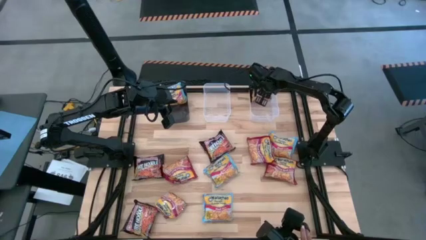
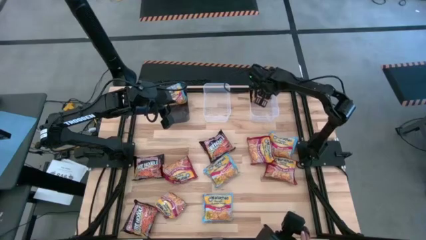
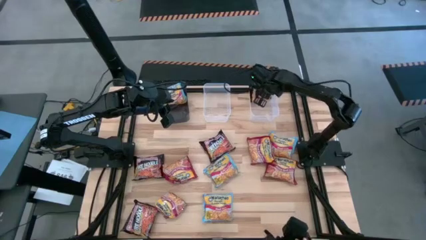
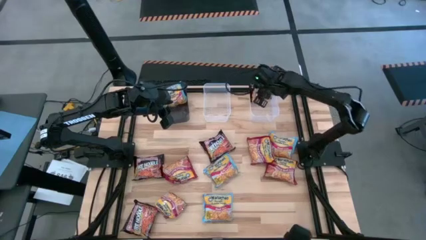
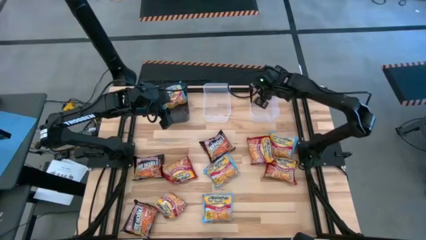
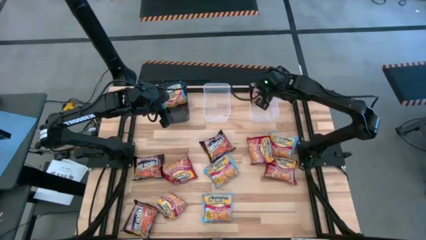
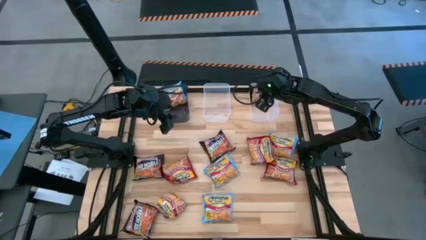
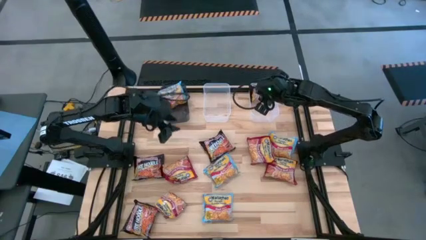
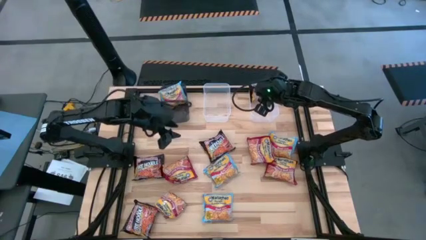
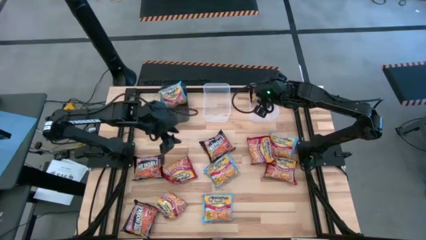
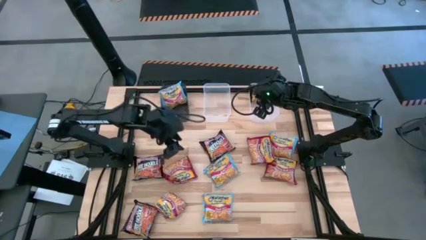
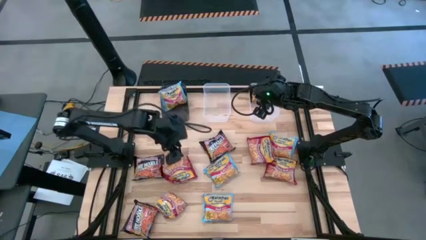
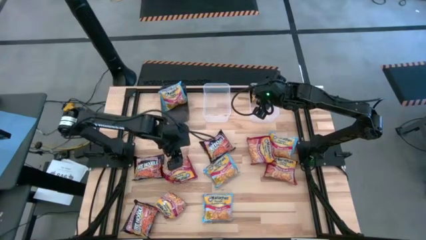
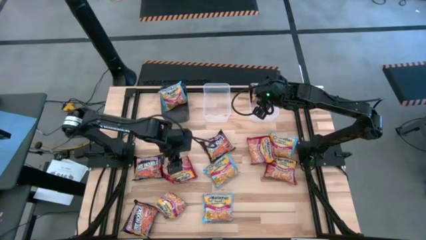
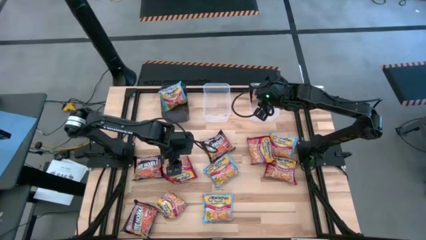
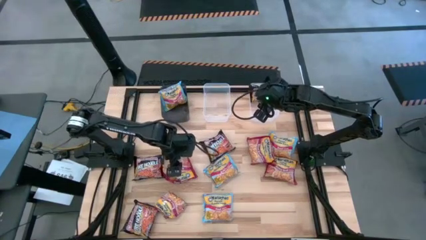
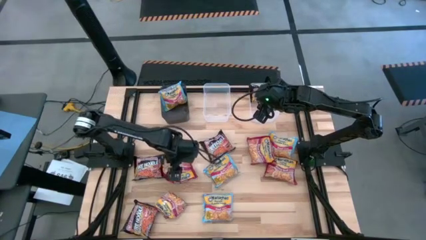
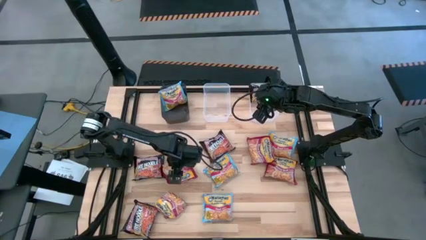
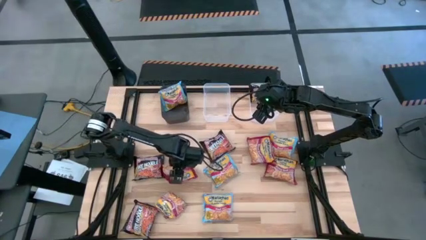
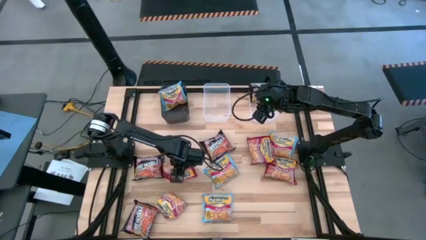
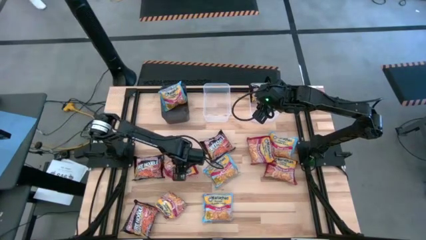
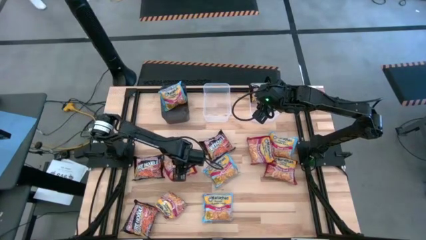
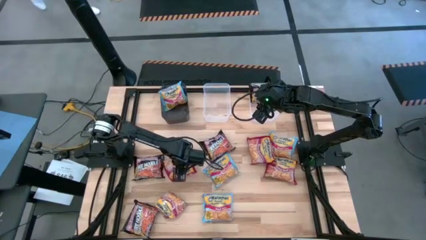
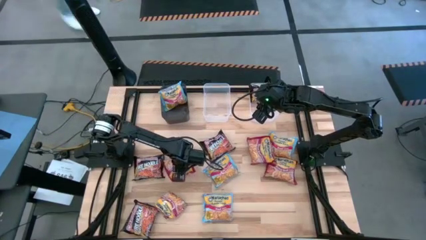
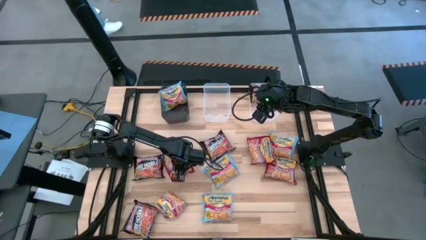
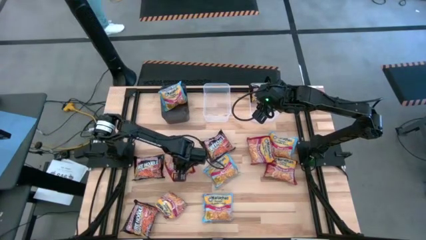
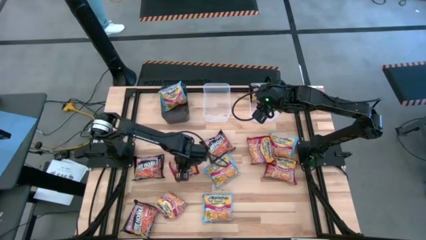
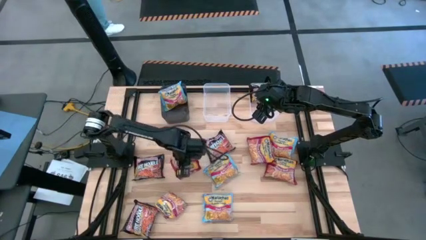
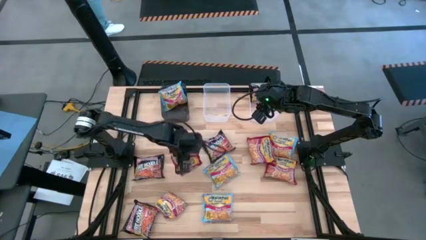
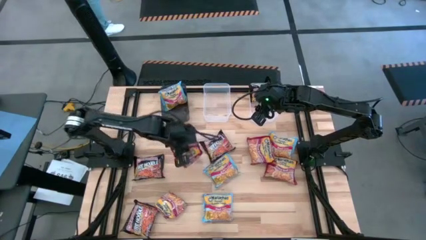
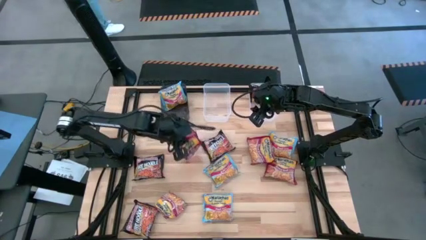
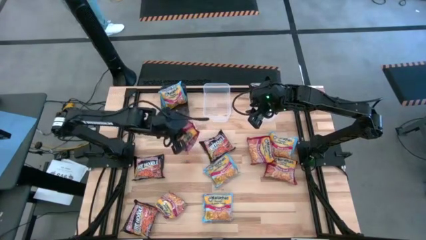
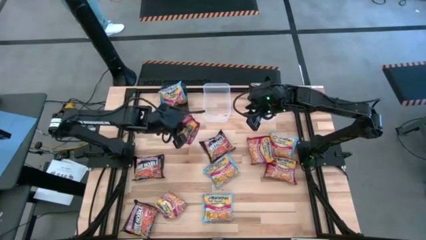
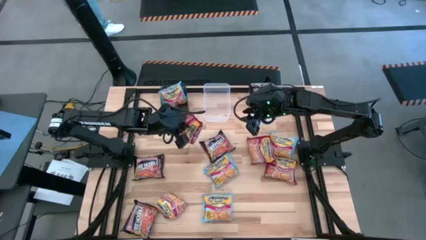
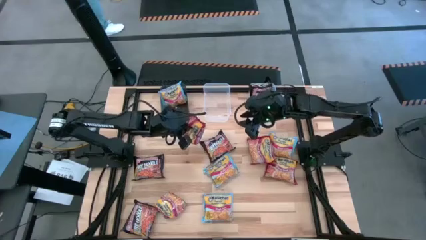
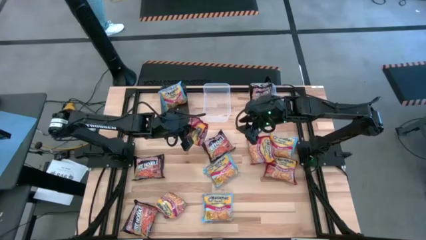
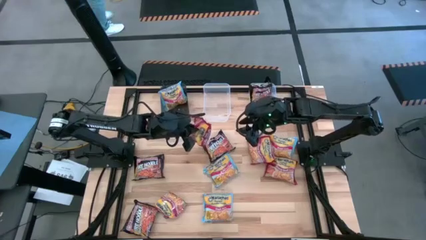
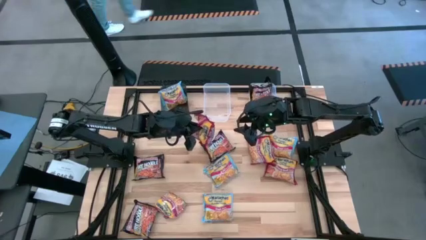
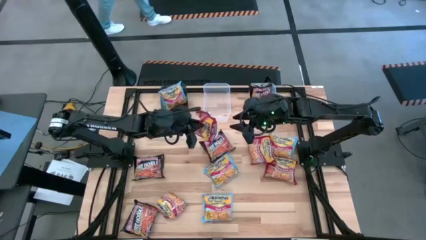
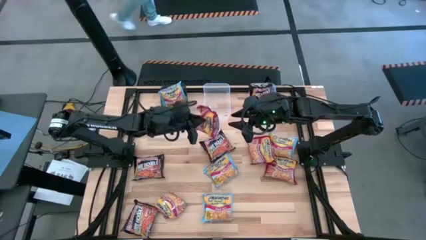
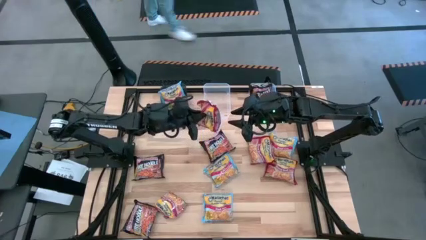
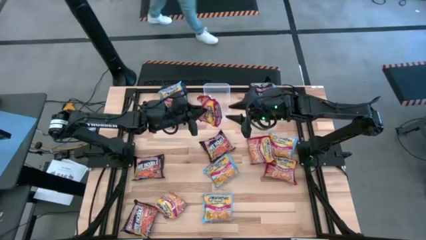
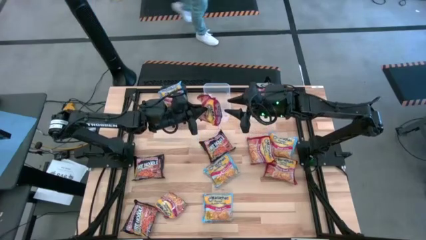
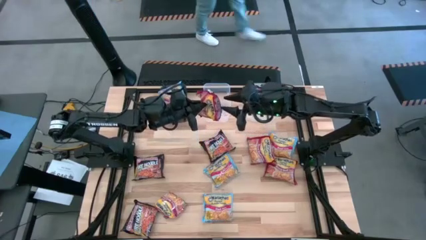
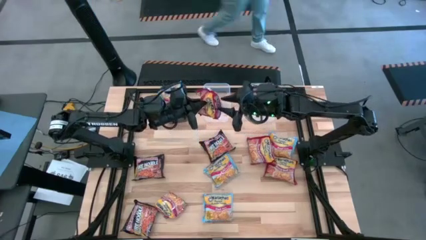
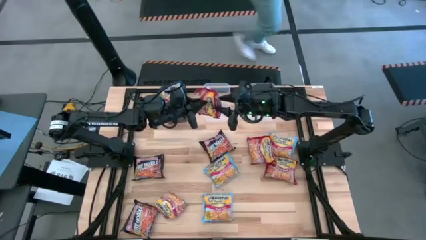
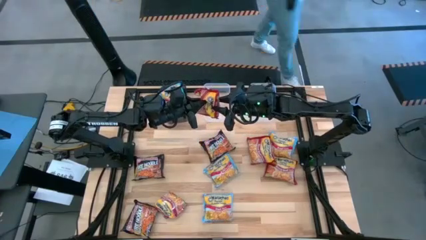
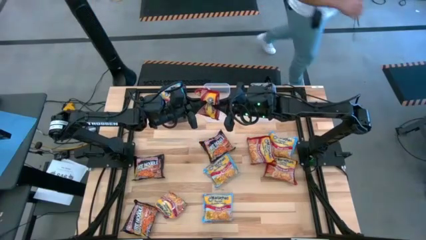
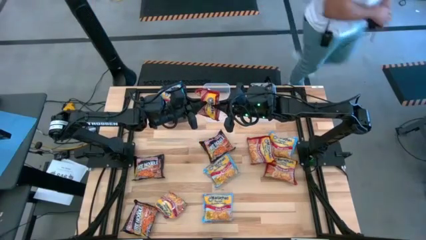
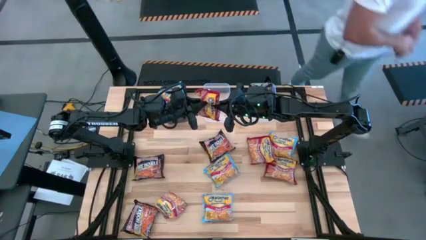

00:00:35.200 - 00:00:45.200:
Task: Sort Maruchan noodles
Put the red noodle pack into the left transparent bin

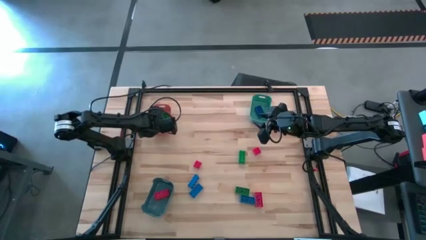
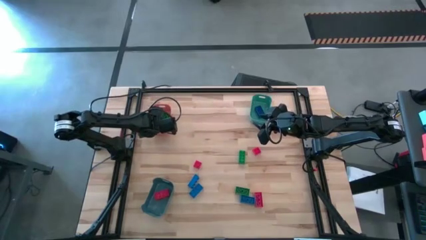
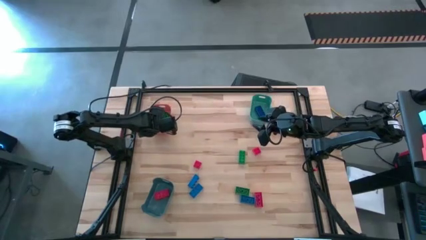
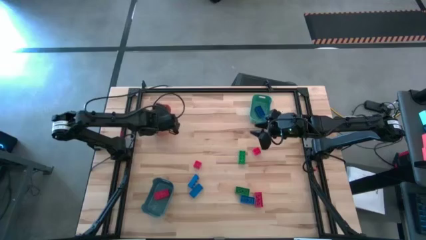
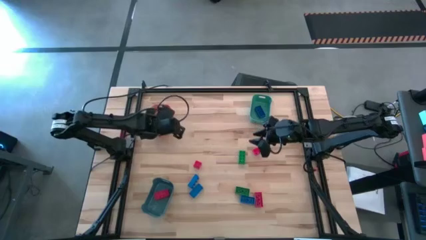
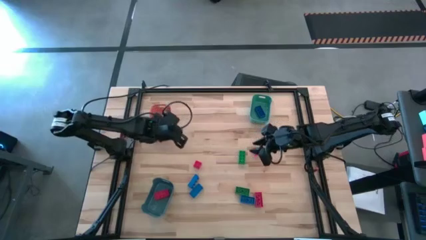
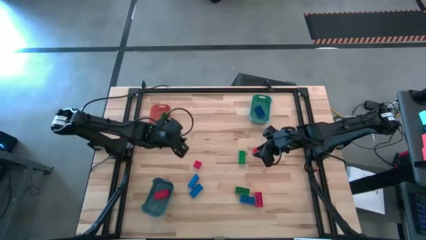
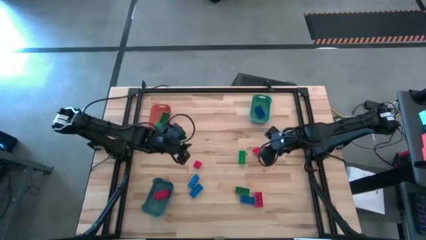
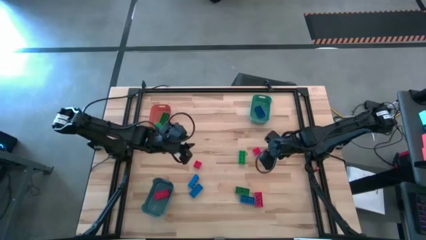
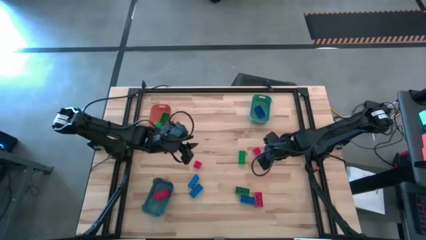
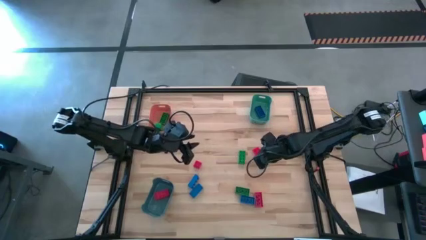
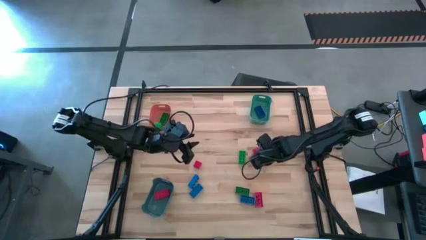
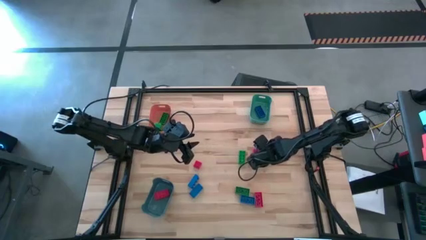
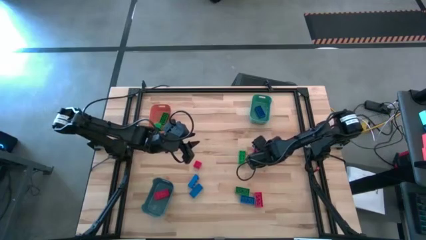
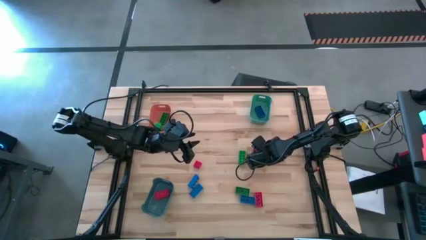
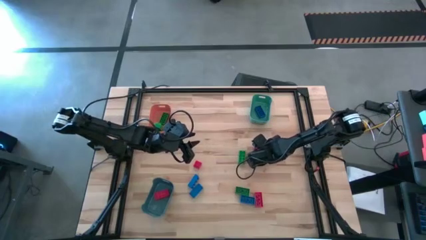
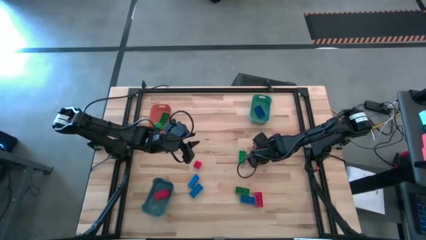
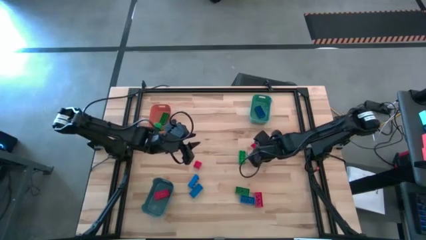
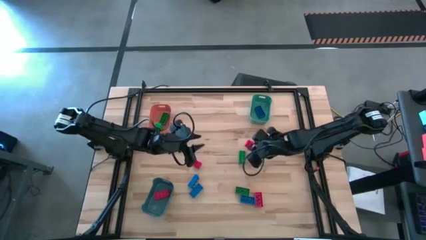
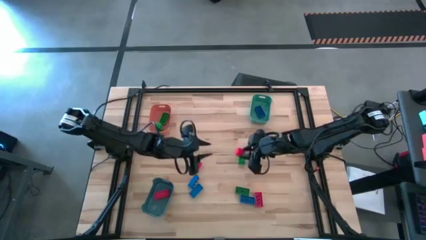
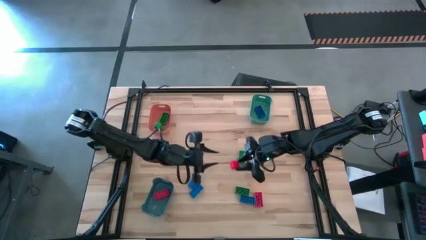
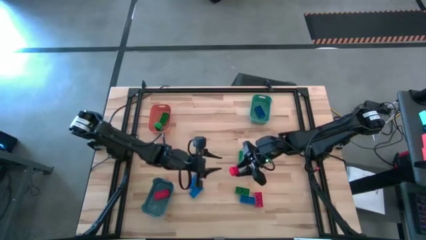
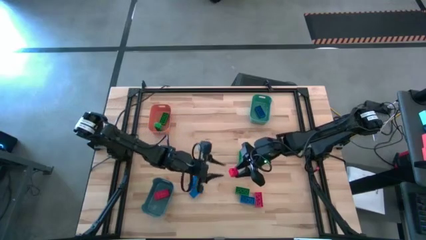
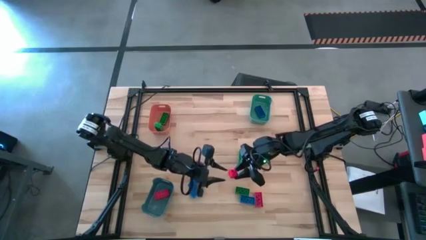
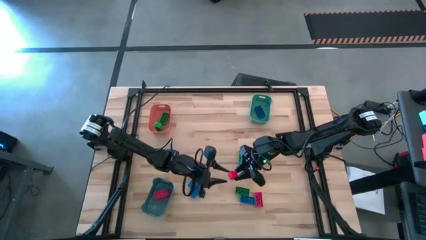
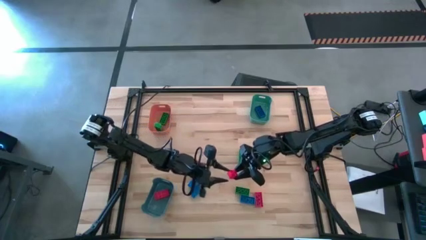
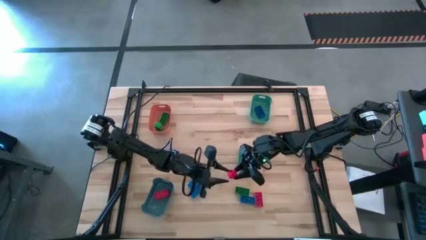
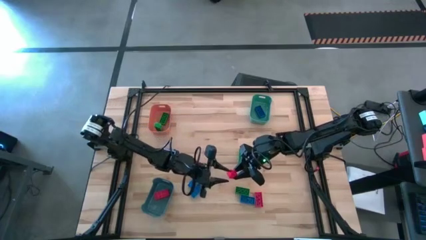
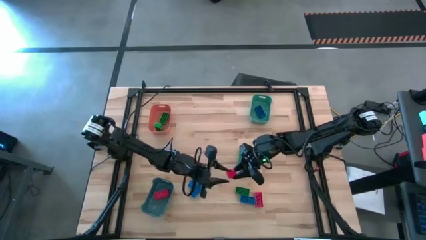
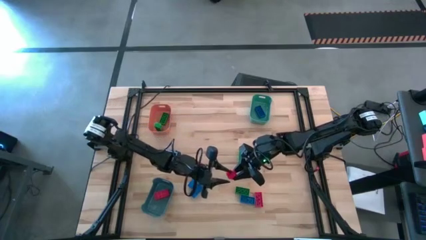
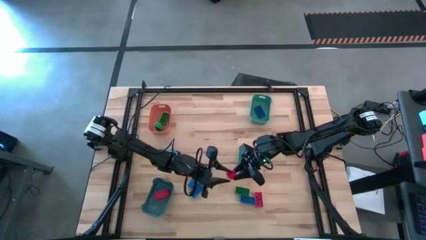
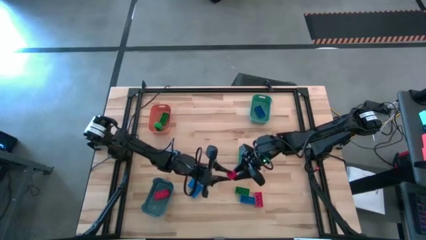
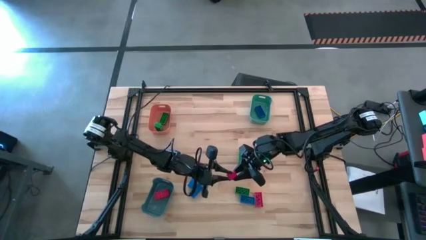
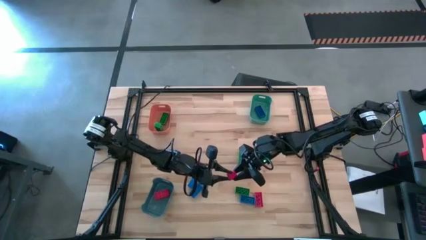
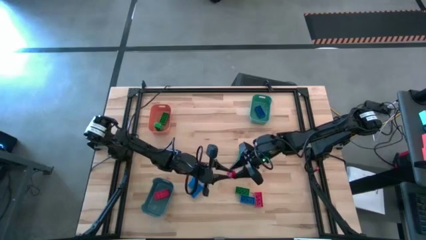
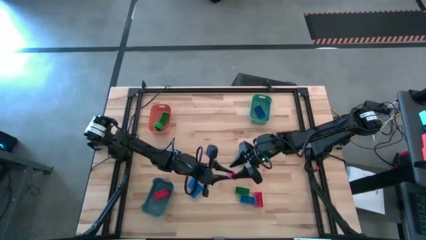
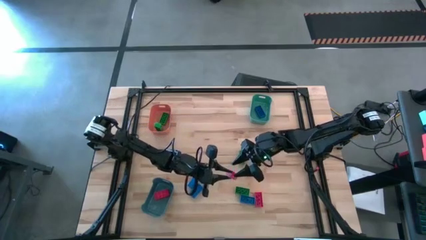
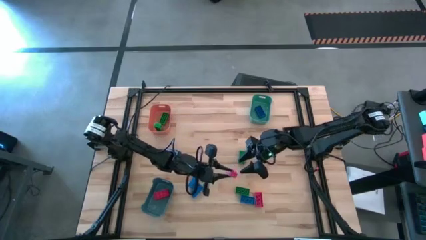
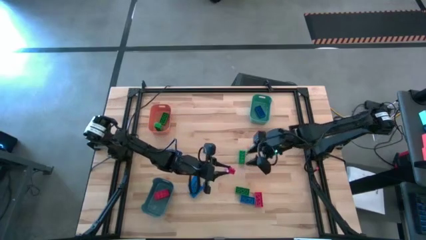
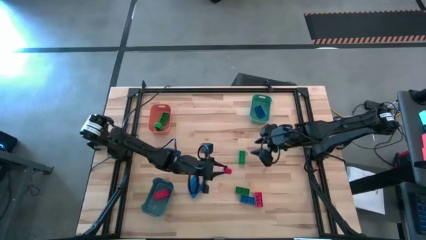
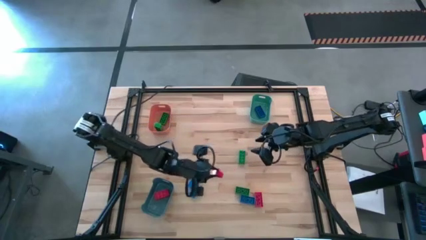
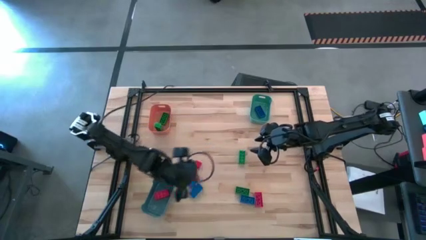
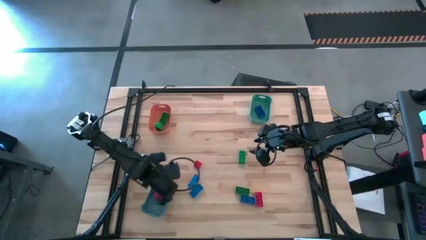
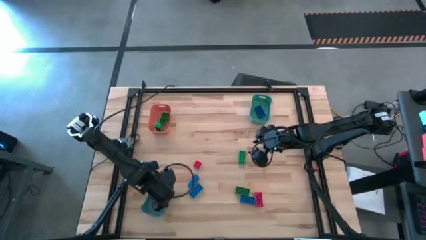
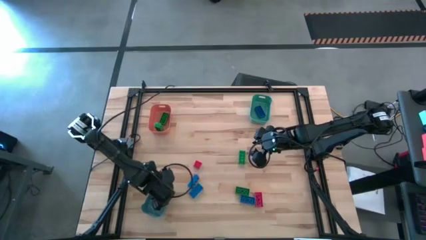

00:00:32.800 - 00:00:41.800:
Task: Sort & place blocks by color
Put the red game piece into the blue bin
